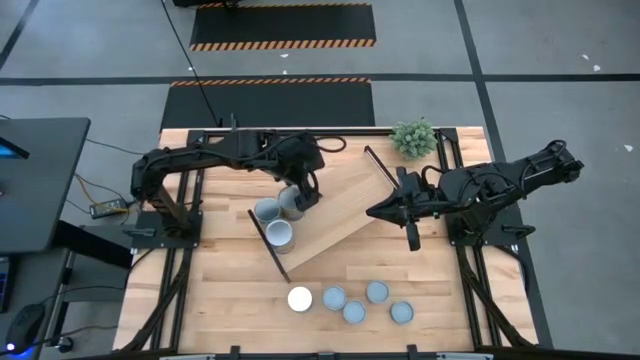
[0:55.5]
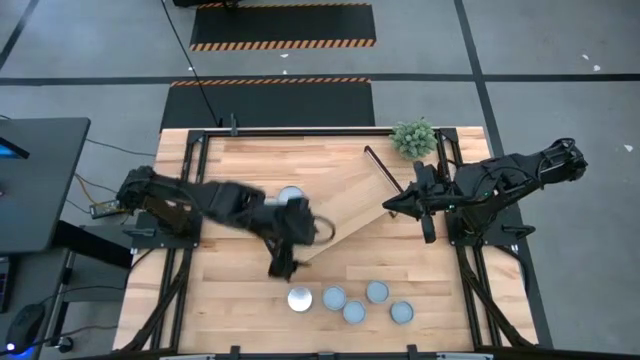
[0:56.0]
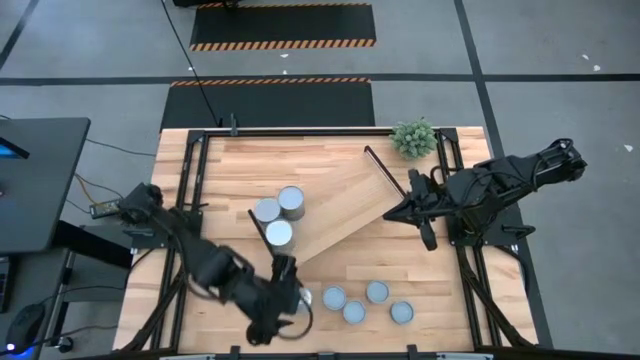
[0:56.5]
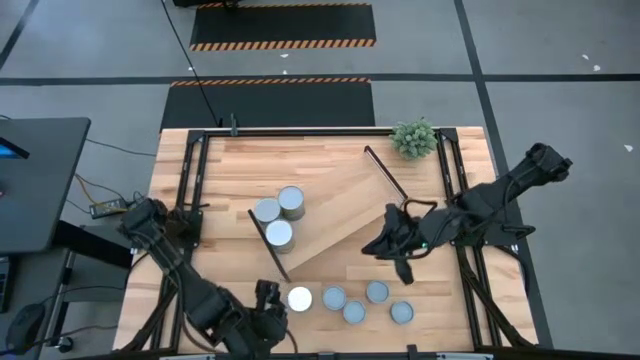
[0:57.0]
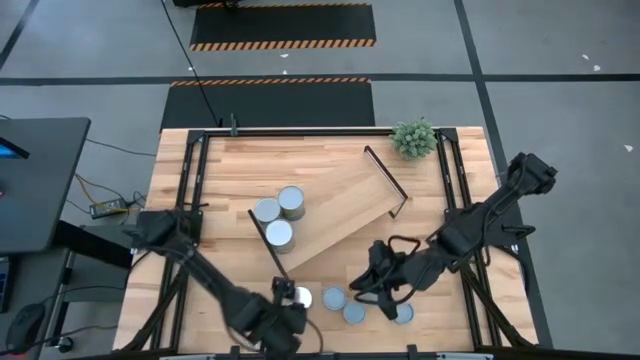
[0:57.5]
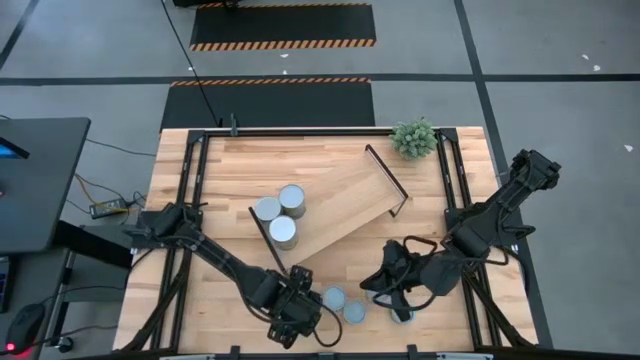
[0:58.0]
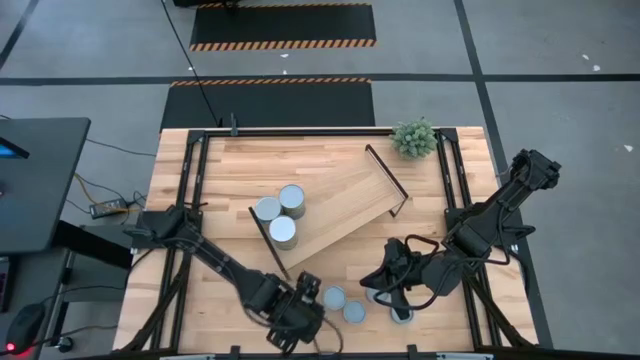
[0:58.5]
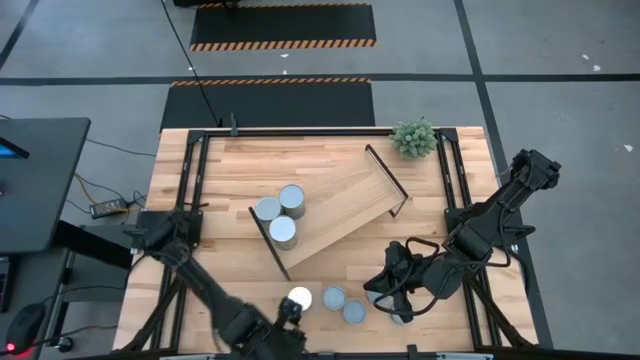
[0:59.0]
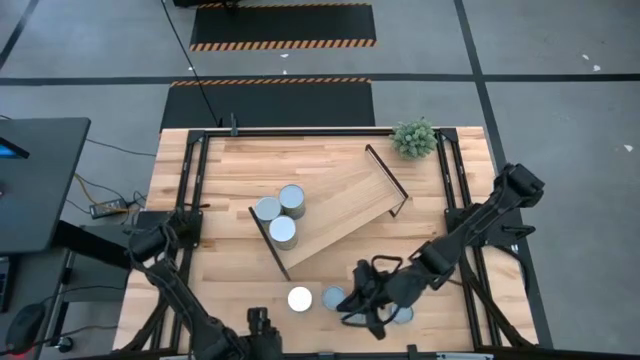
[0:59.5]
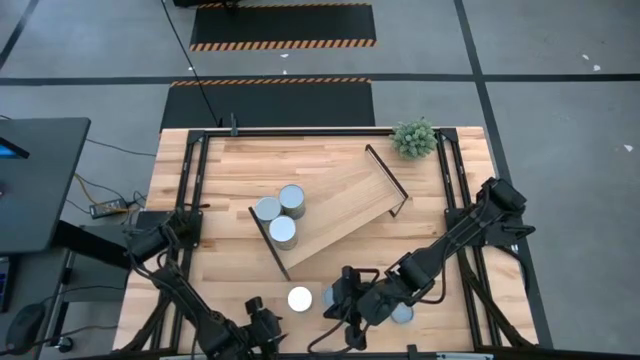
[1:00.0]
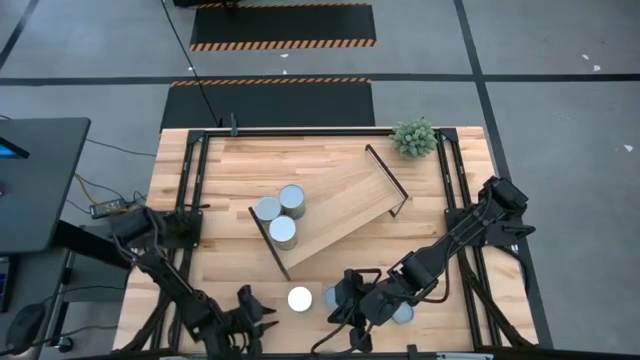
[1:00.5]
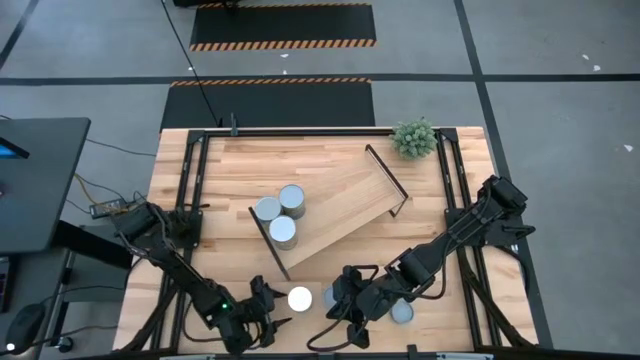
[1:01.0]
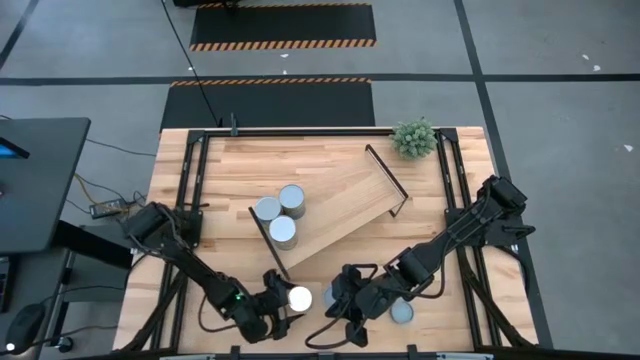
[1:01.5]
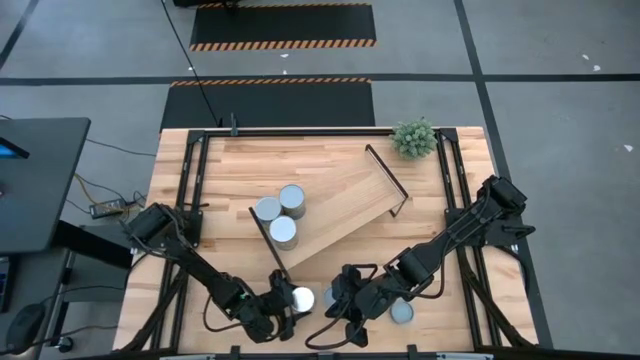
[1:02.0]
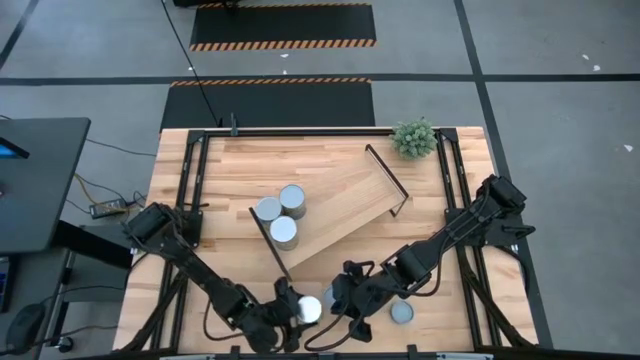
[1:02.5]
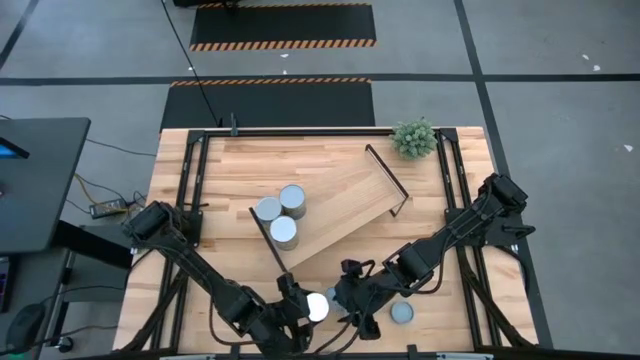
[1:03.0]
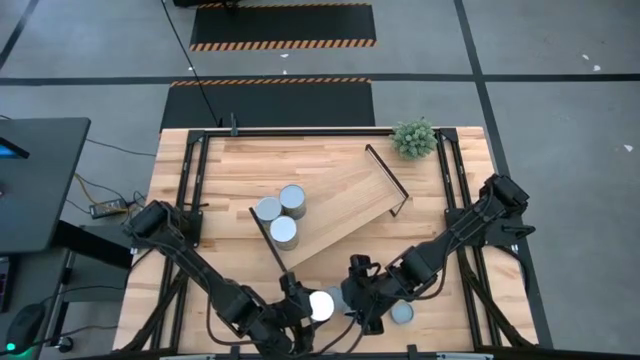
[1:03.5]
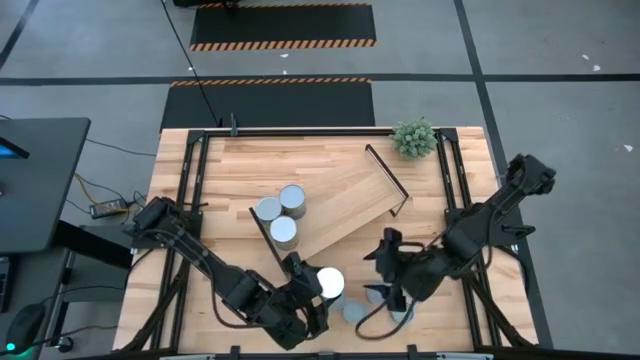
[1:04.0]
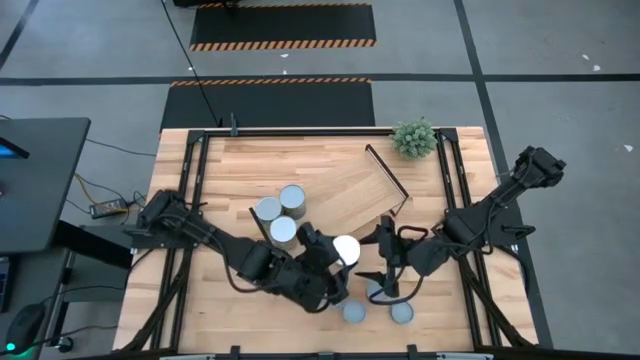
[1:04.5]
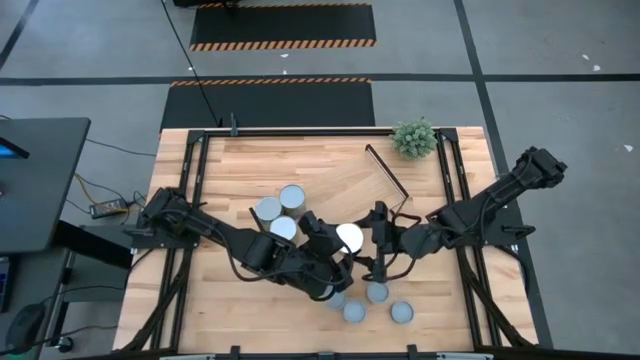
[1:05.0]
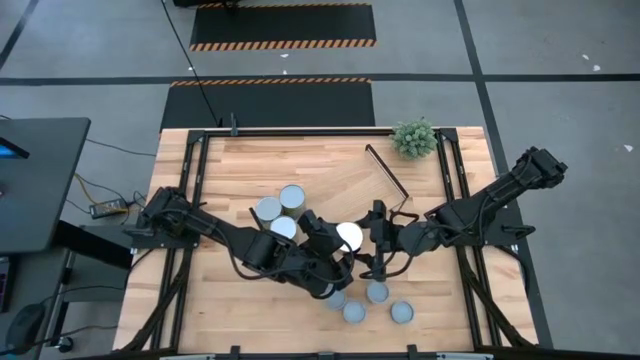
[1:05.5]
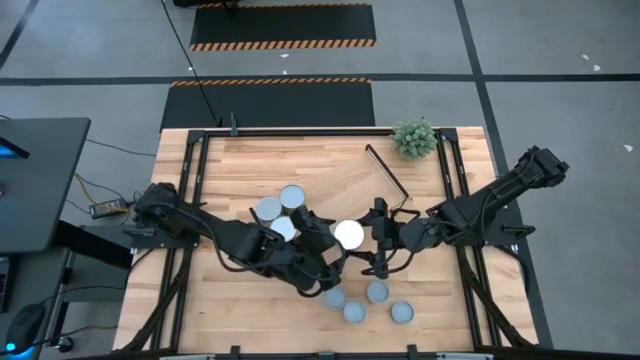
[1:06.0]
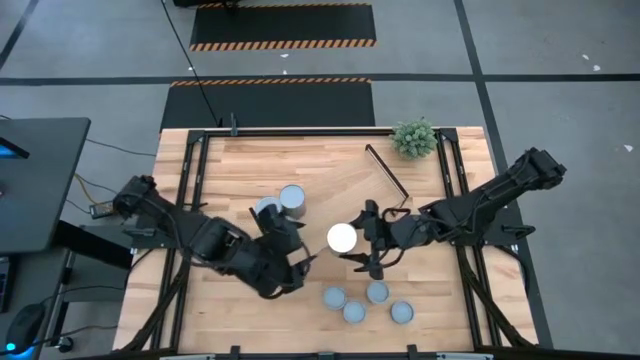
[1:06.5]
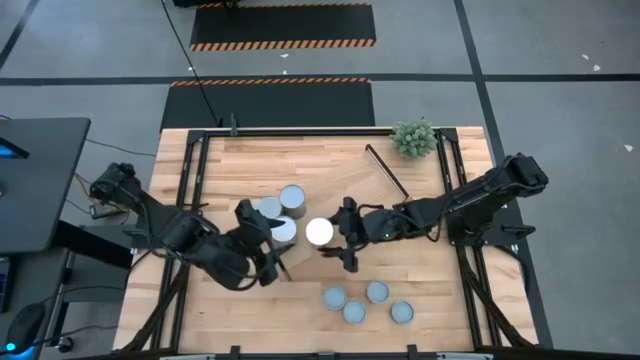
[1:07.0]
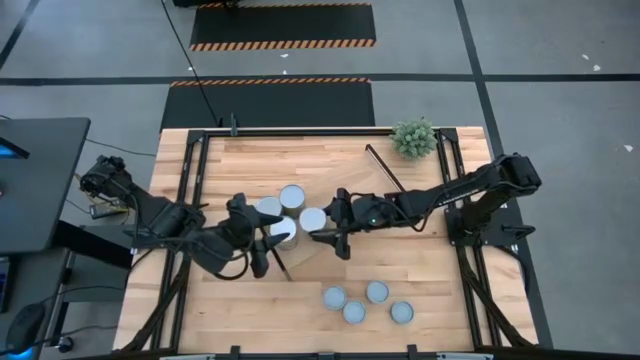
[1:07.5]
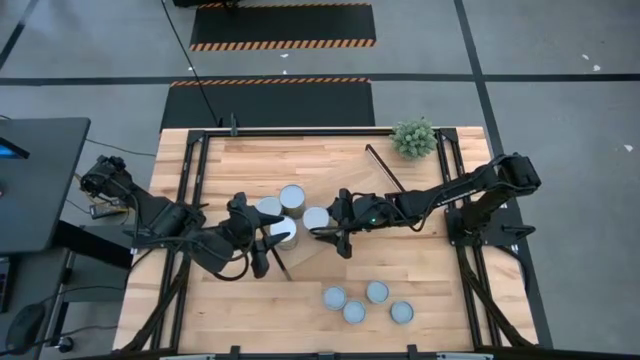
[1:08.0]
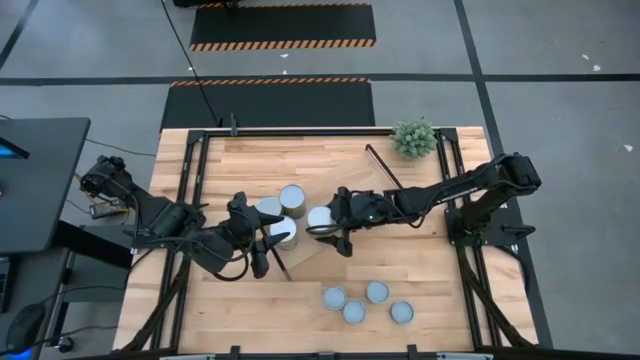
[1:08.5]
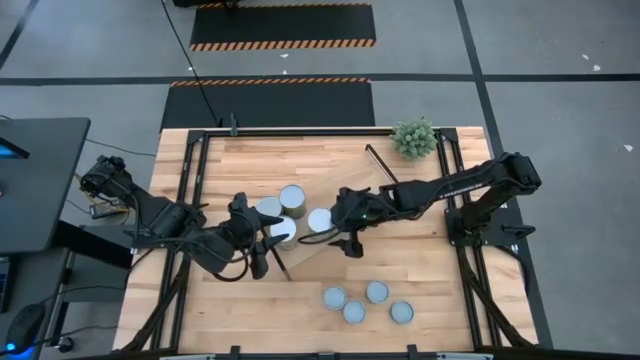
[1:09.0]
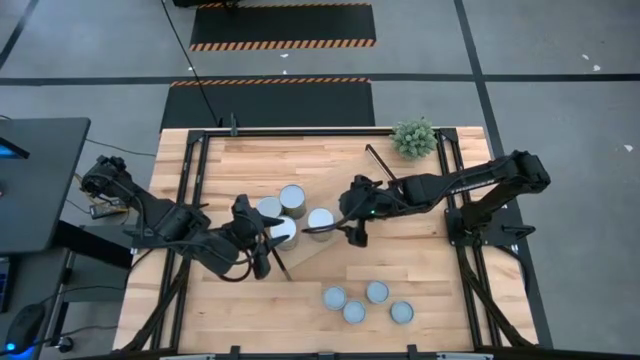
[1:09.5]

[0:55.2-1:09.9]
Task: Pick and place cans onto a shelf
Put the canned oranges on the shelf

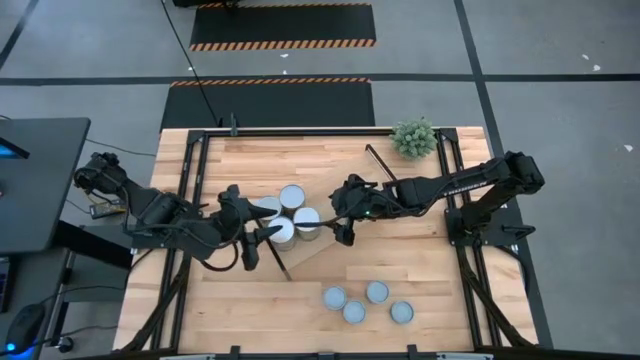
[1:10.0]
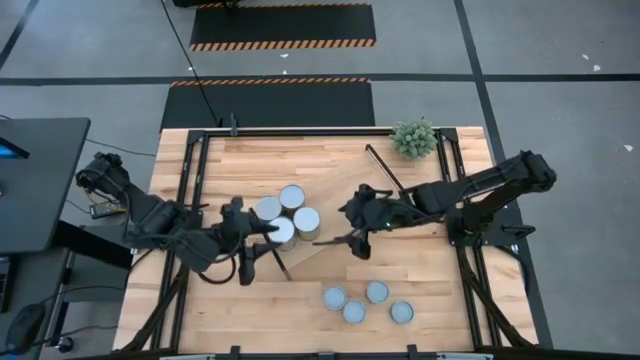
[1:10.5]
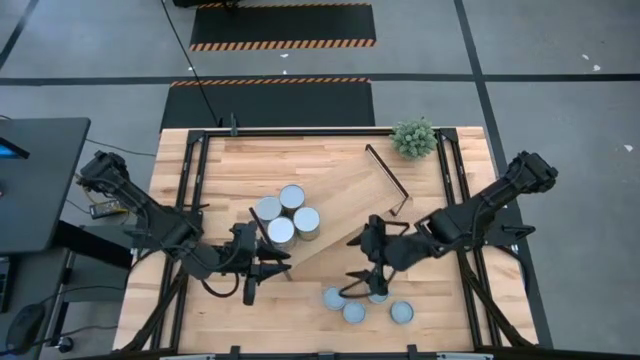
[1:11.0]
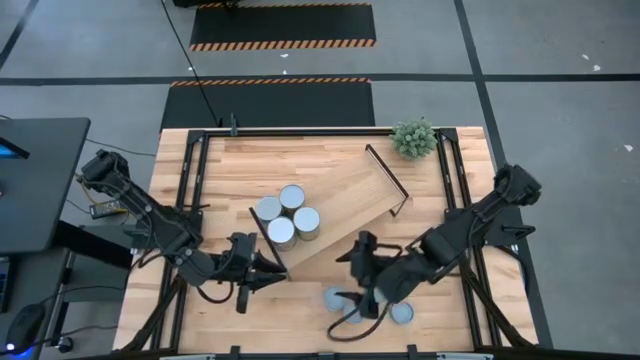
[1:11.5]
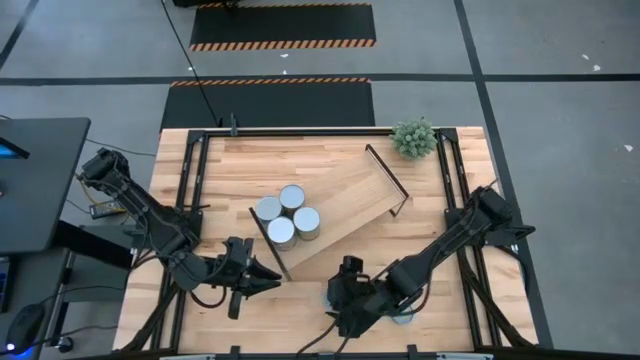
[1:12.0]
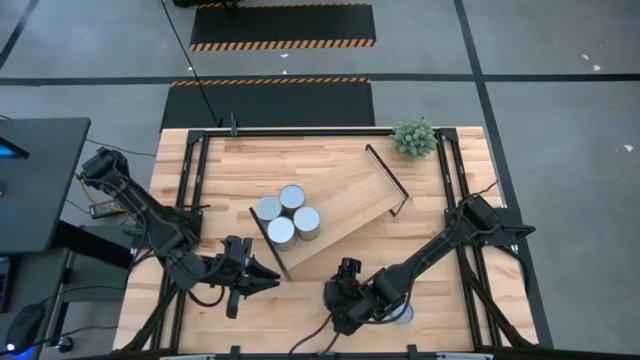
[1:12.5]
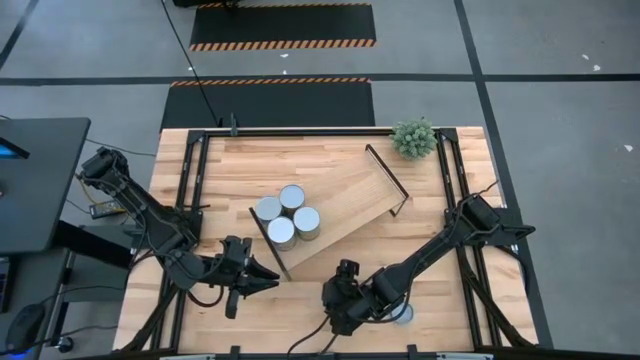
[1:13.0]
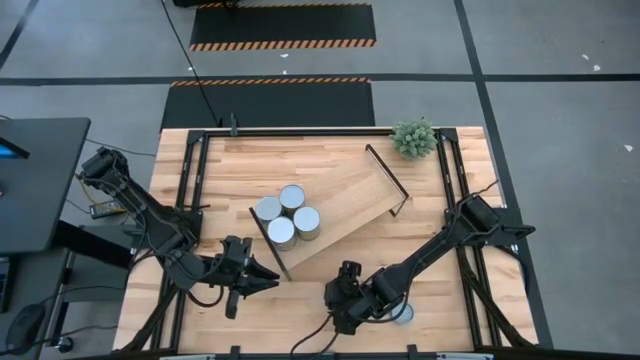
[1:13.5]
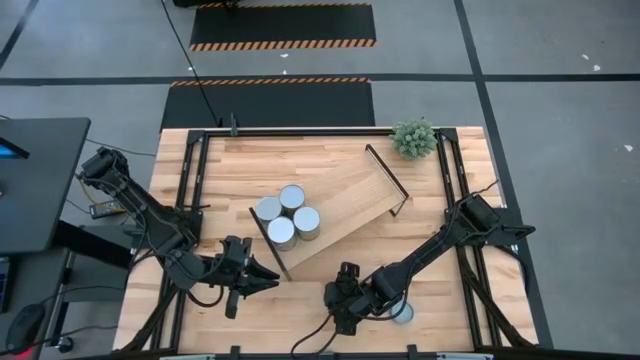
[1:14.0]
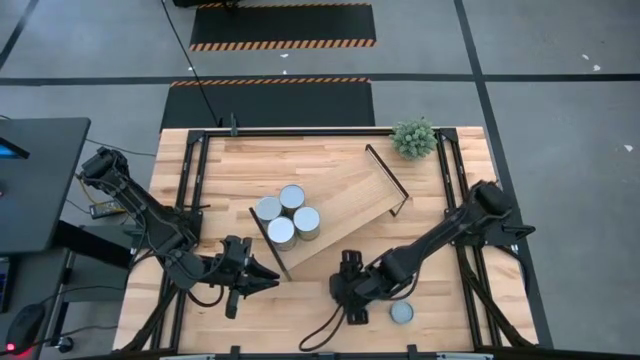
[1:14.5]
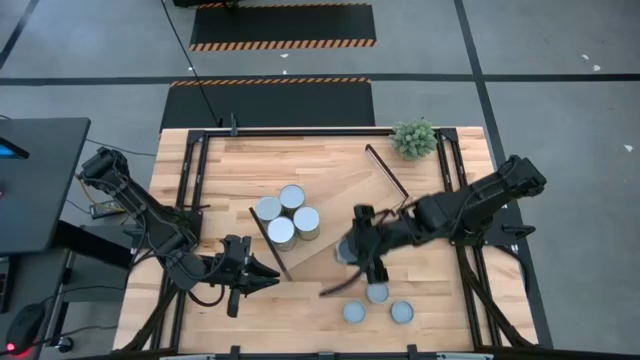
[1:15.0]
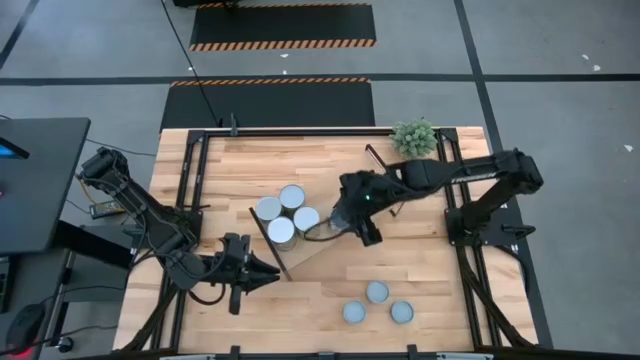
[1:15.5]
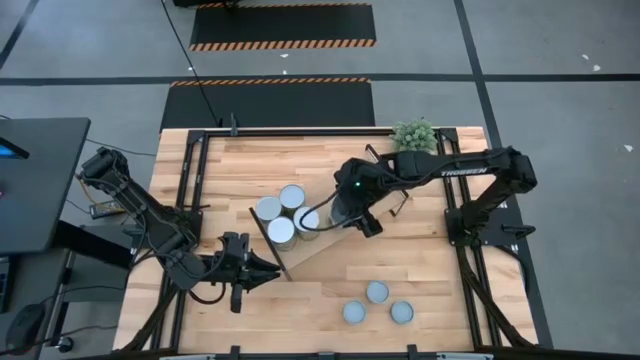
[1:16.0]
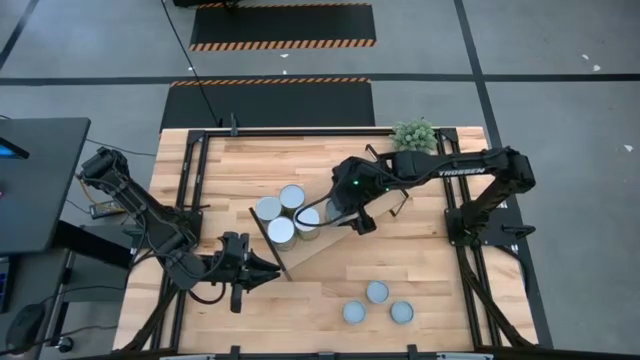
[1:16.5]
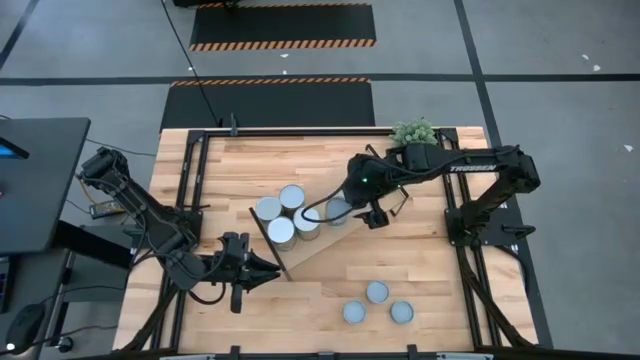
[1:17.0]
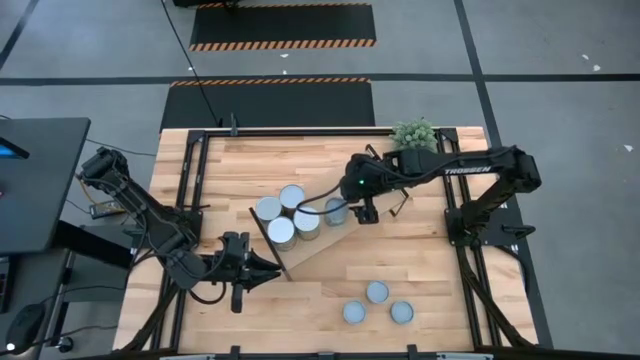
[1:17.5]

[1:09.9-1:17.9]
Put the canned mixed vegetables on the shelf
